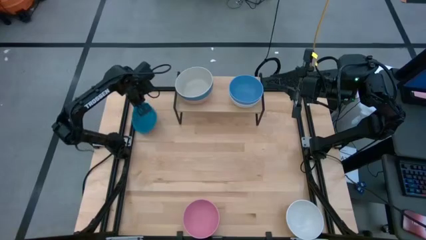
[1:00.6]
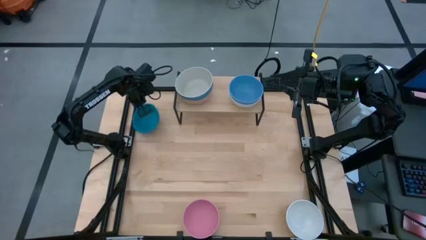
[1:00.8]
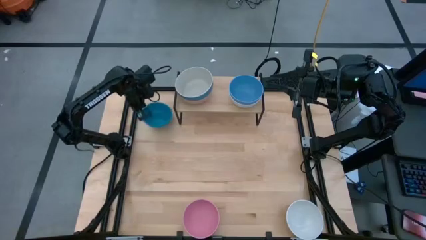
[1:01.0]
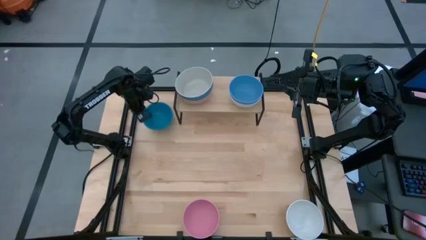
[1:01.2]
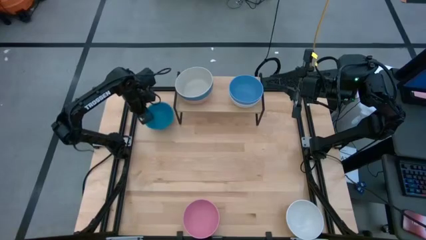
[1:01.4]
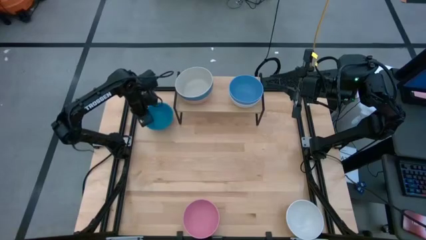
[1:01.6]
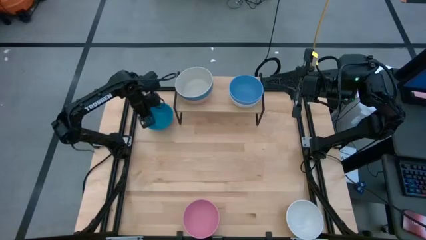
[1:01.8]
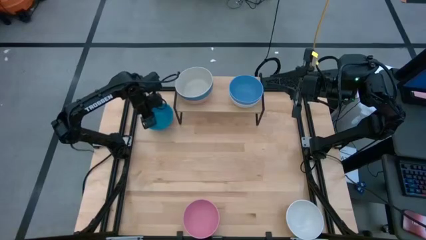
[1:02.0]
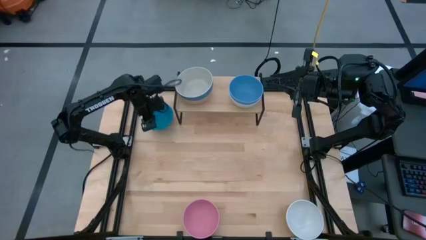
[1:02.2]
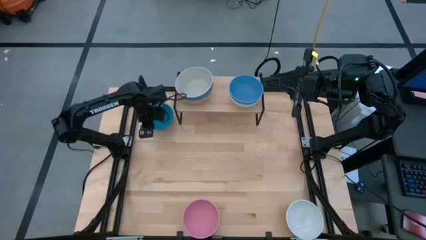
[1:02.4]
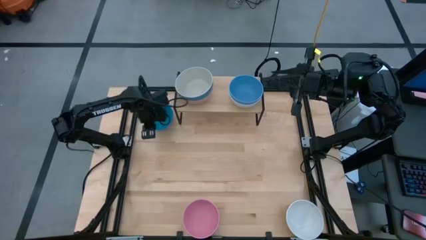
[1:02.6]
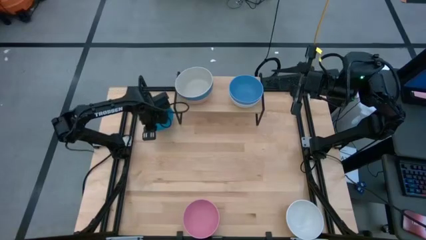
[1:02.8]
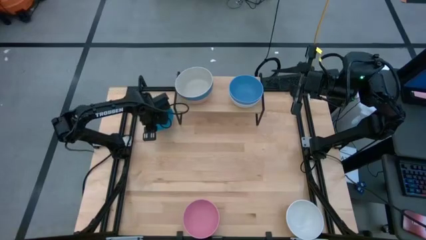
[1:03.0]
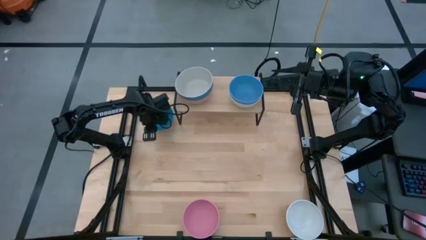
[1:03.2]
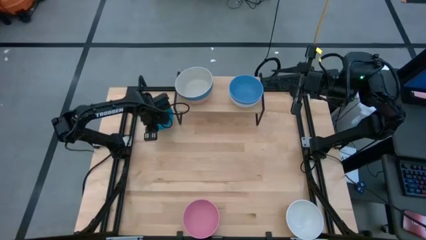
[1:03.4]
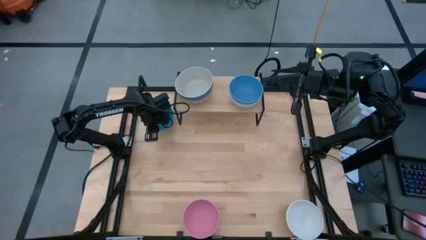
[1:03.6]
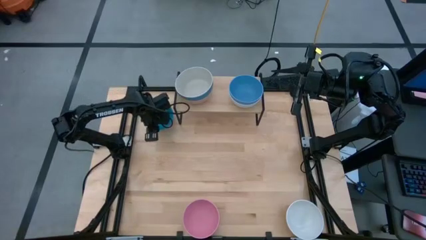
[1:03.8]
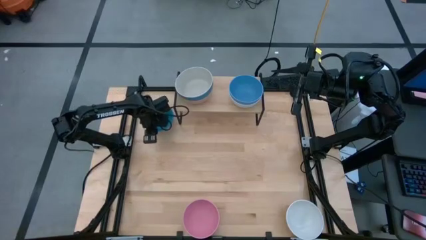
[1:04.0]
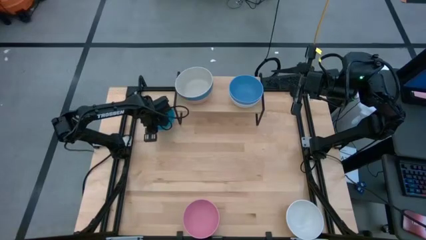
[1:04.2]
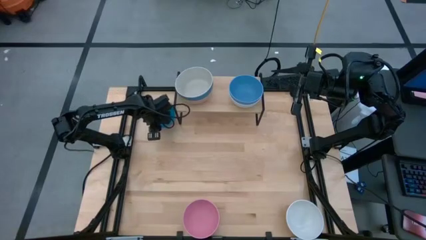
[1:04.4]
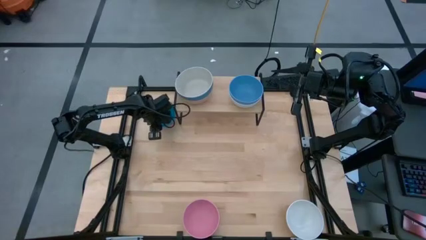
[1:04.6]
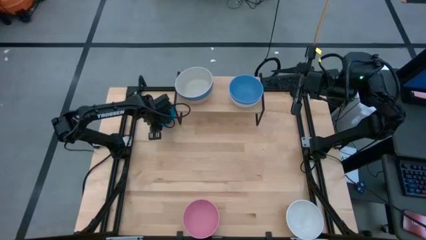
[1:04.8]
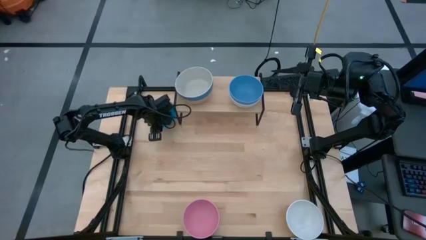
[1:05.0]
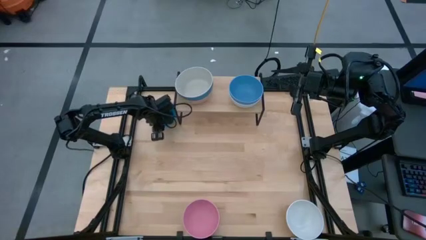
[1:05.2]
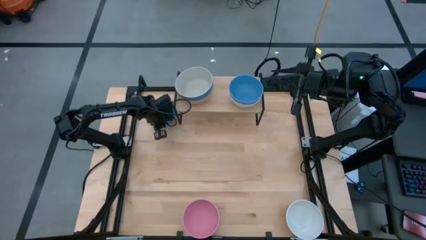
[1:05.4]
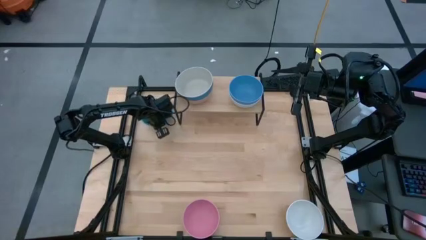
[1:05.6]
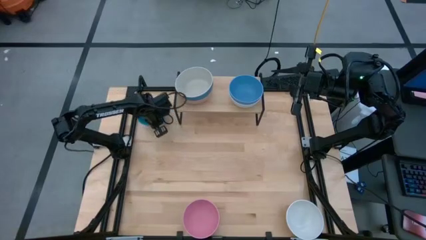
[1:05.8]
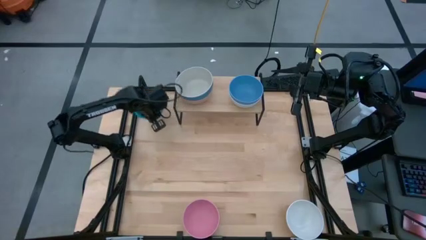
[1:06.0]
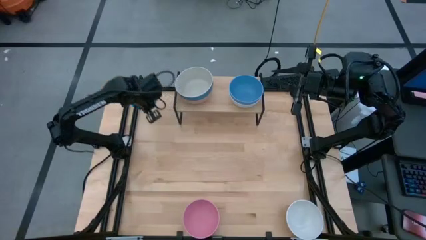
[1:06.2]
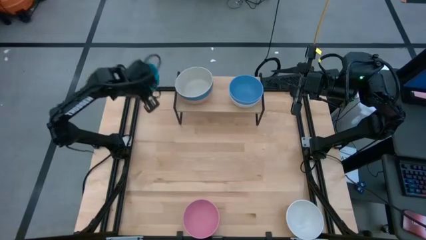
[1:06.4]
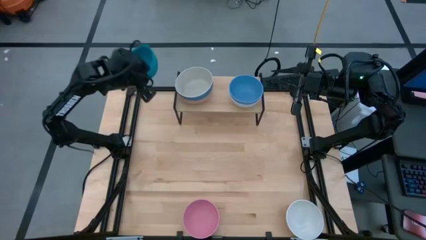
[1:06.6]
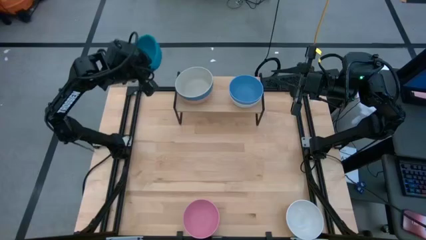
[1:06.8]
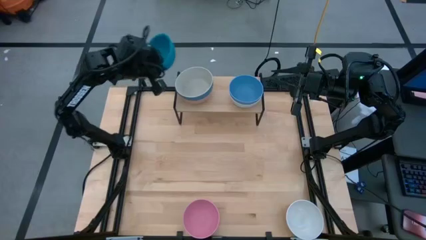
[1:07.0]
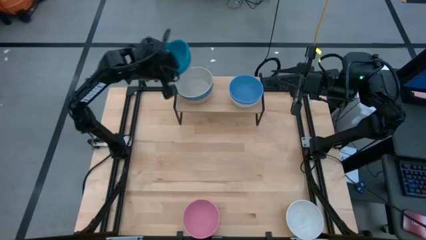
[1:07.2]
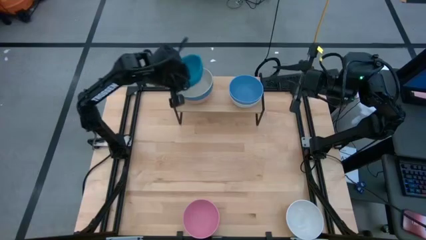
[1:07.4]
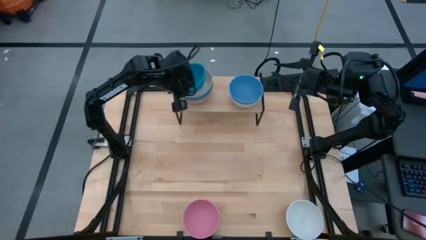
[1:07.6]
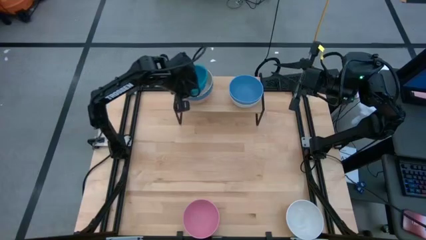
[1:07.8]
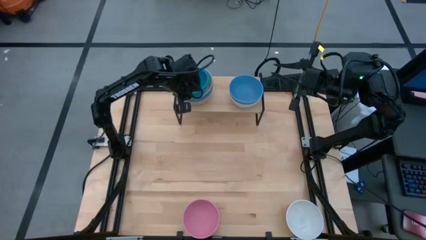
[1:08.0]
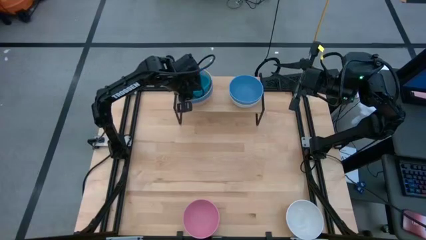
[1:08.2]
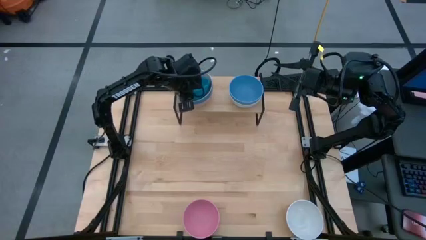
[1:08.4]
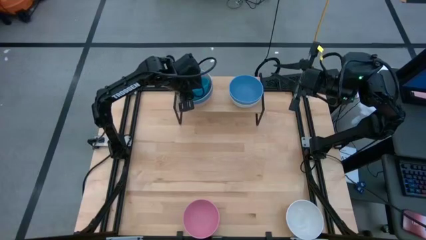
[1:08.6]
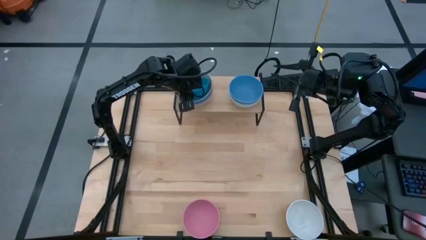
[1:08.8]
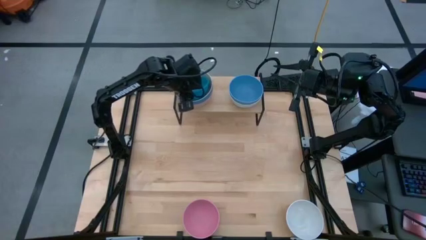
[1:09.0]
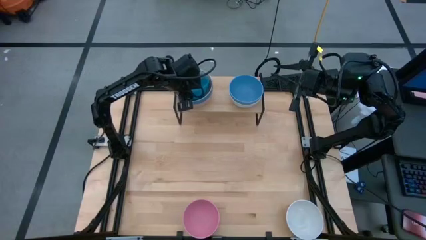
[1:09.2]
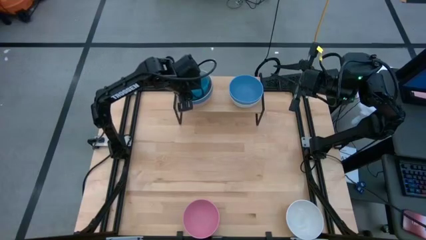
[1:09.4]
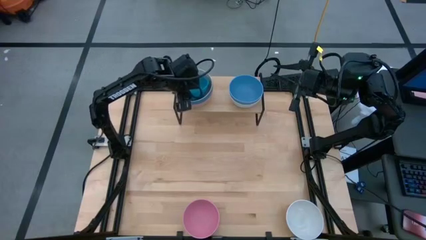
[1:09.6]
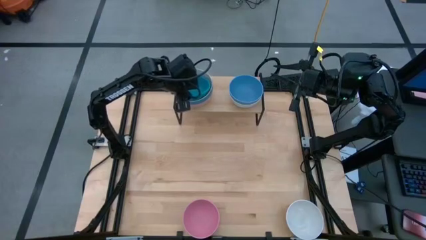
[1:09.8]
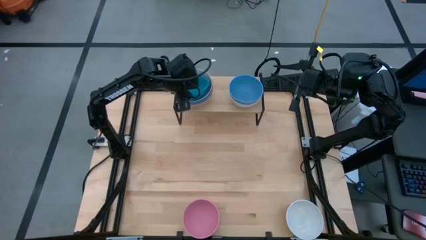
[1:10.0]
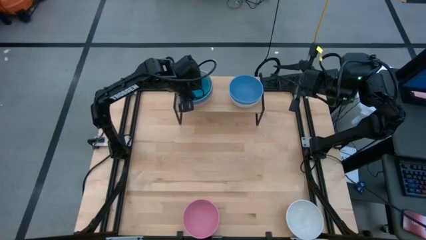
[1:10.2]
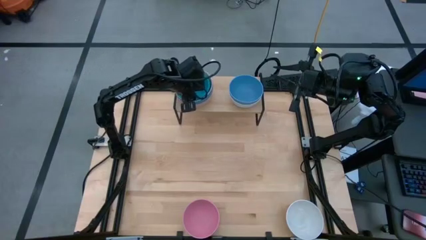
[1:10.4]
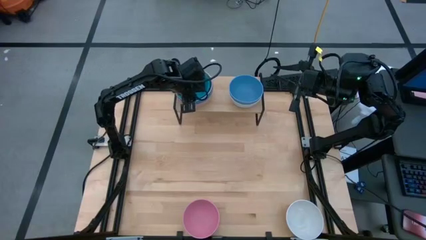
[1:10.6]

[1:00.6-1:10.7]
Task: Place and stack bowls onto a shelf
Stack the blue bowl on top of the gray bowl on the shelf

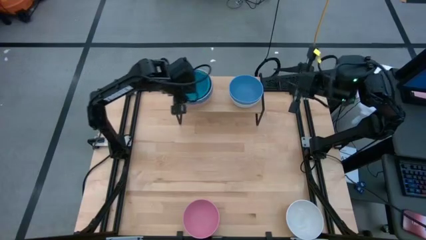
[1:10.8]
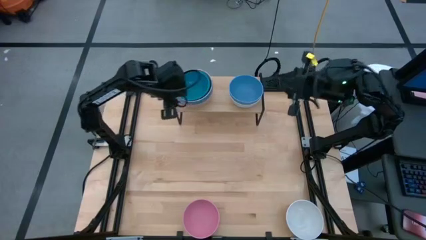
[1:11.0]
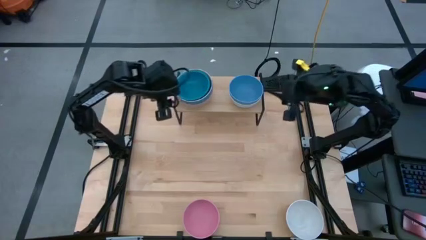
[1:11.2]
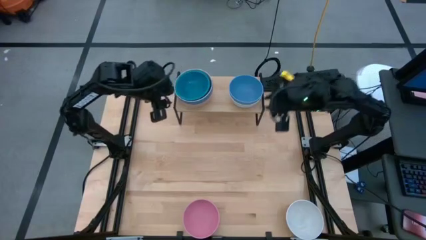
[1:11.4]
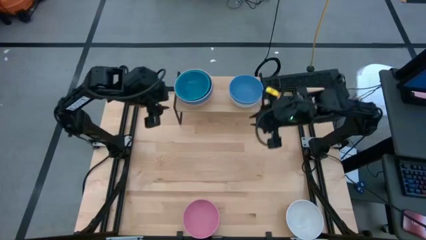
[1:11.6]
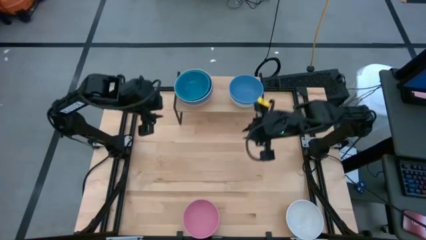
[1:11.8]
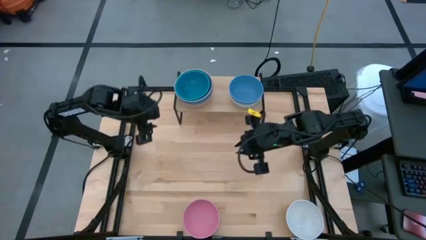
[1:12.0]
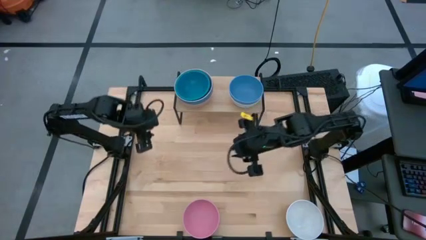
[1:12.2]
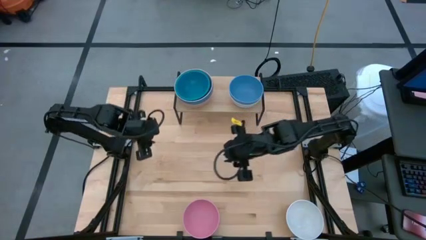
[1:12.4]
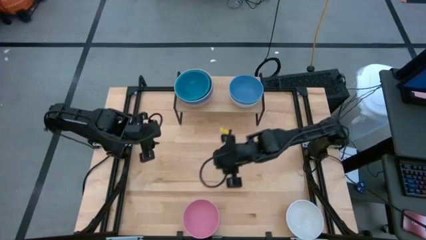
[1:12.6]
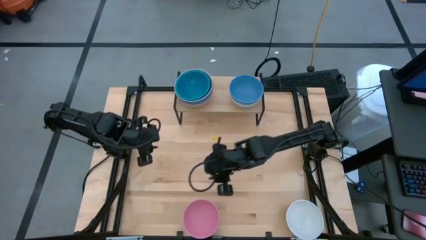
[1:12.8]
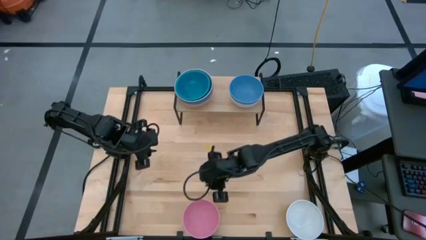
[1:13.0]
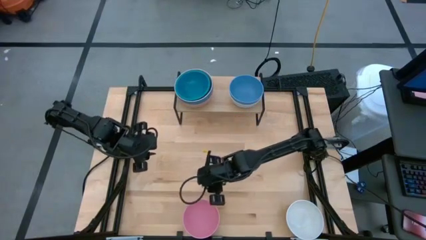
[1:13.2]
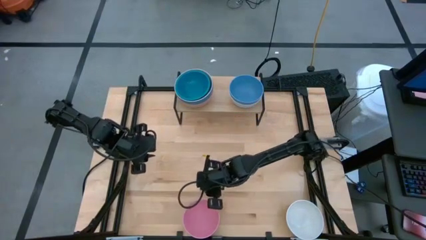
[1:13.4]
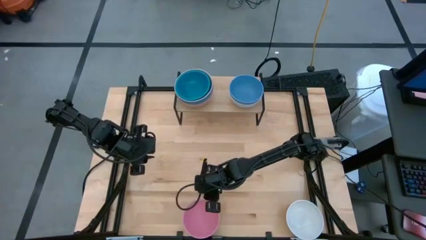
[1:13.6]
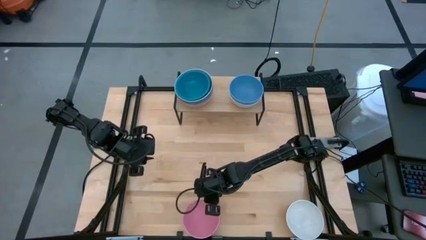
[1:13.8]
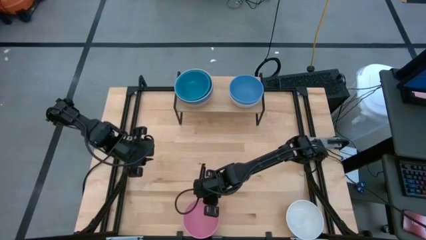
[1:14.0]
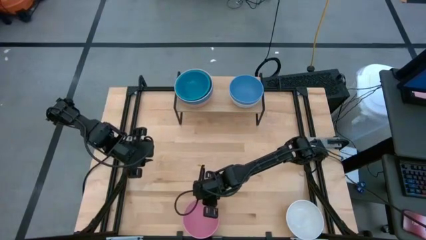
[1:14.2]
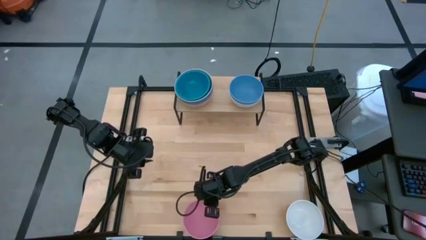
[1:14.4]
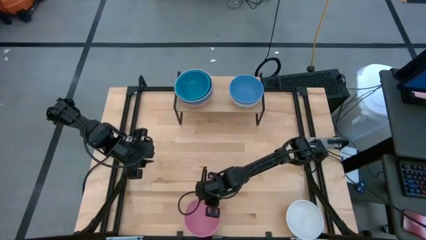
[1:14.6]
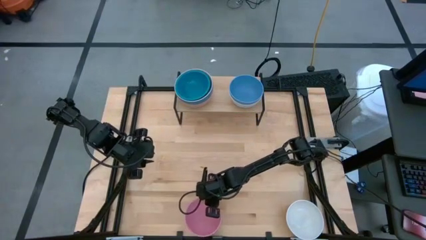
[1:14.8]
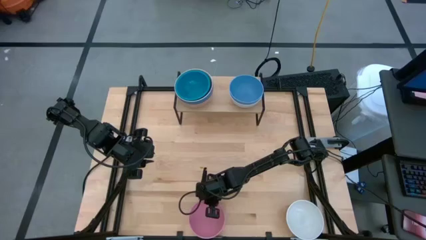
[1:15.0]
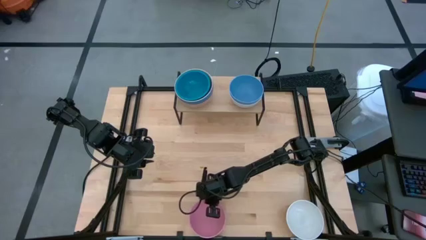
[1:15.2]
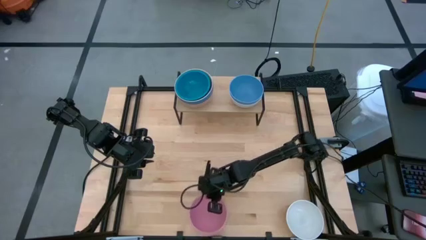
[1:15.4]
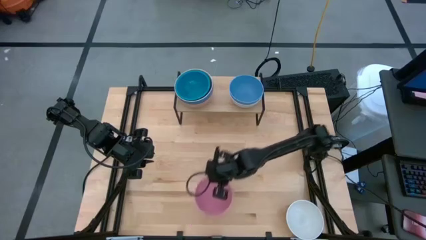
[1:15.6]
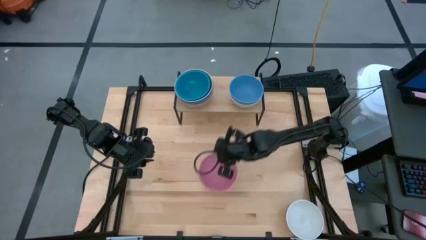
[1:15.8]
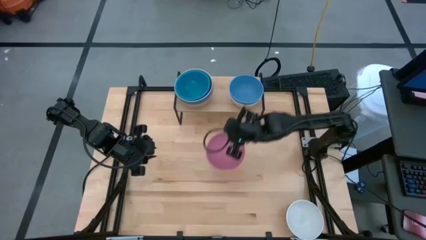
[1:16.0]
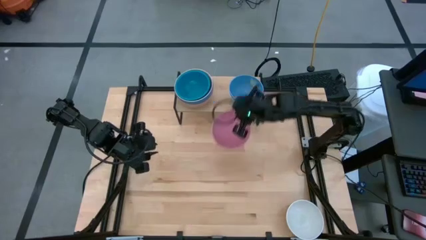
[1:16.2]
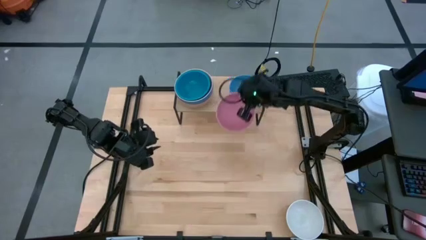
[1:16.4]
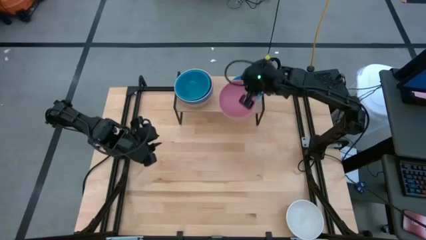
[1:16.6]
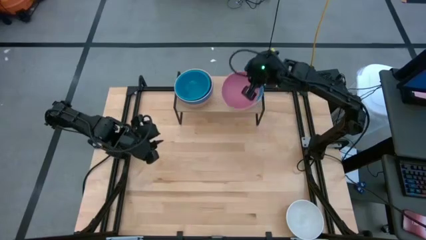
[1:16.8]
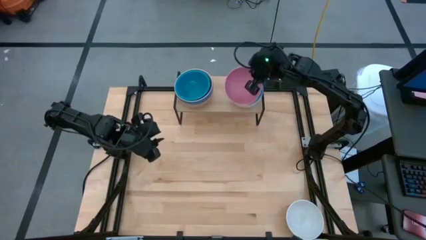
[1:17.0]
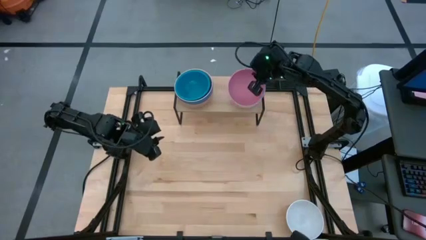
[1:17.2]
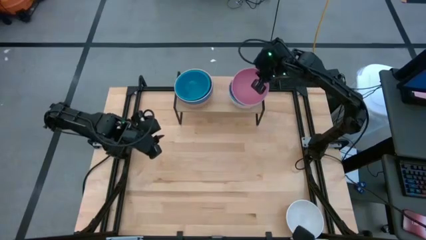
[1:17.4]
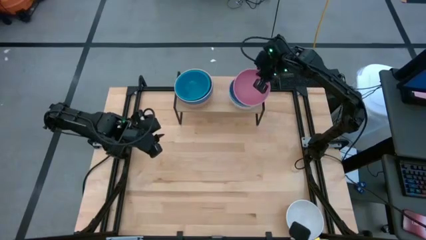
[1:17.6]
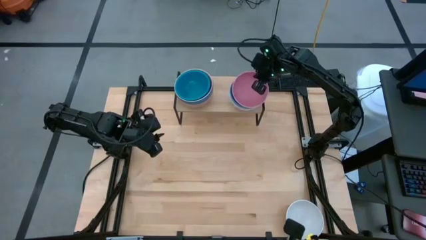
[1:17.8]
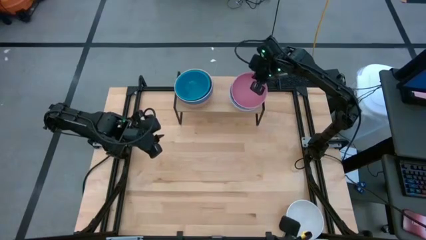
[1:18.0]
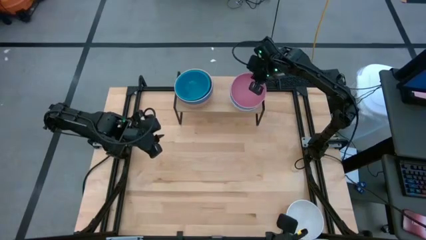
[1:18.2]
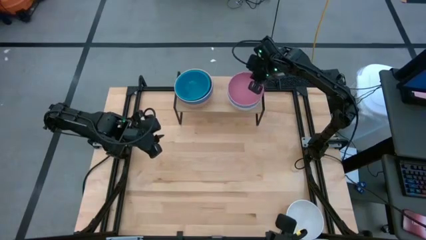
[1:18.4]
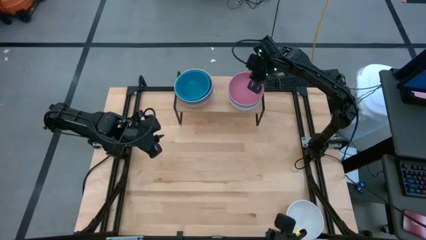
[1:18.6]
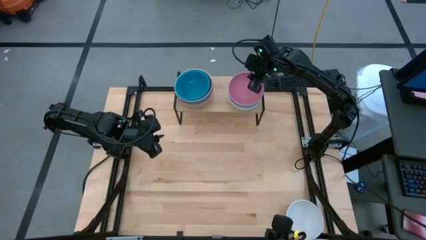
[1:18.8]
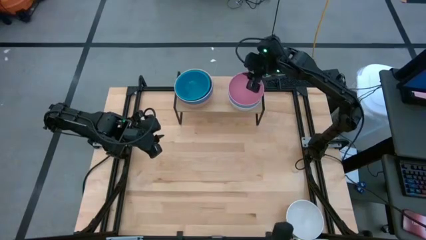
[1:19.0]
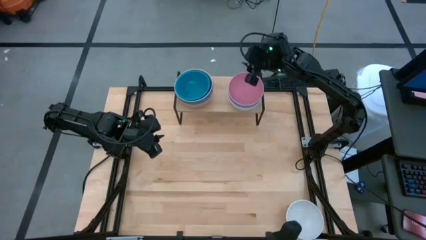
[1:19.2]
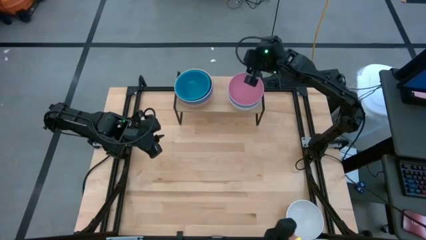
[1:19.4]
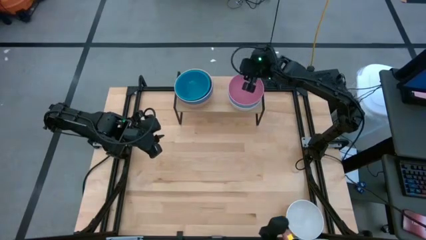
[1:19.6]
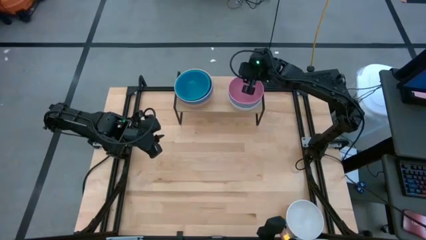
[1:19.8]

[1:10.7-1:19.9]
Stack the pink bowl on top of the blue bowl on the shelf
